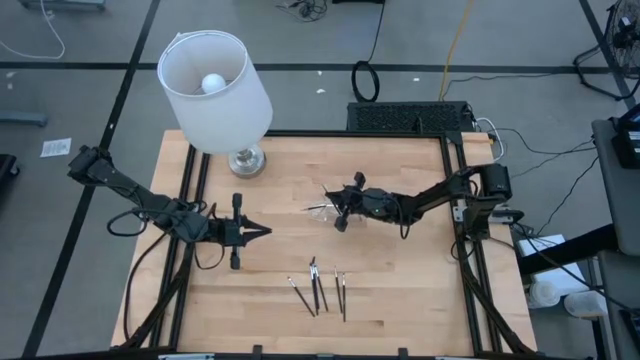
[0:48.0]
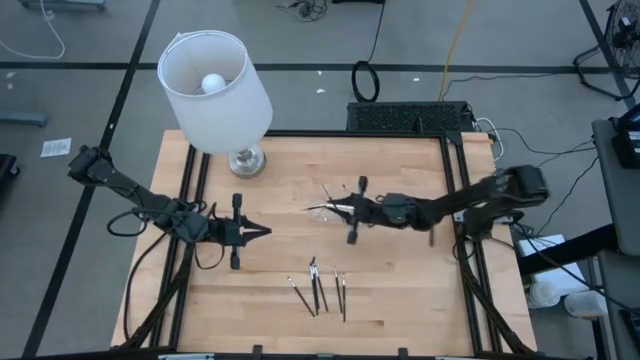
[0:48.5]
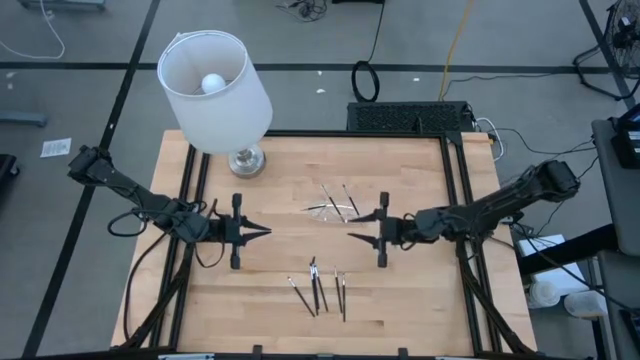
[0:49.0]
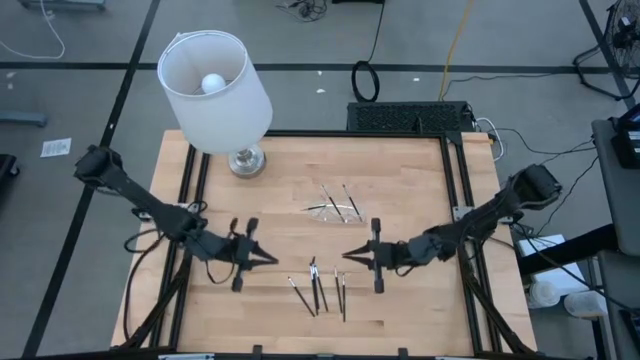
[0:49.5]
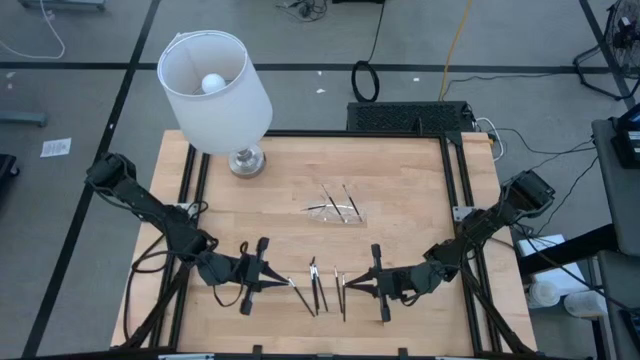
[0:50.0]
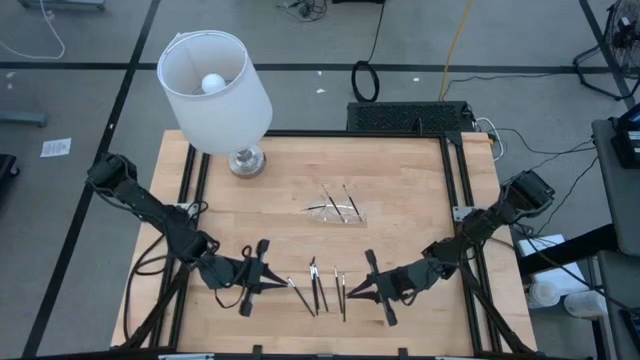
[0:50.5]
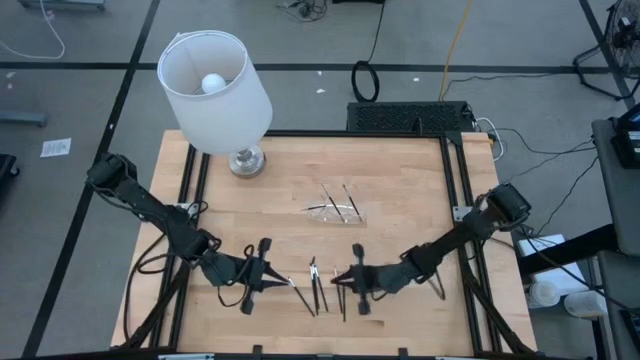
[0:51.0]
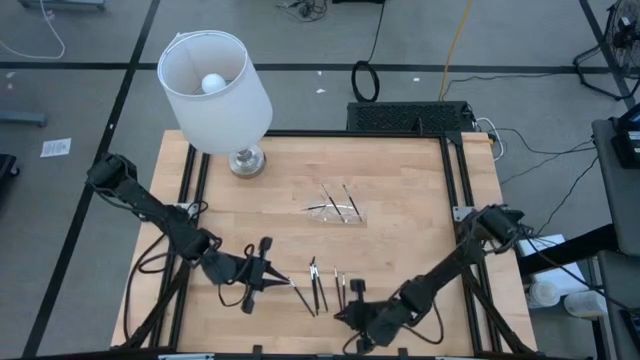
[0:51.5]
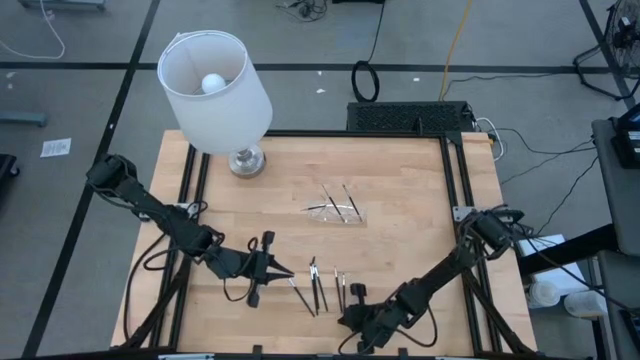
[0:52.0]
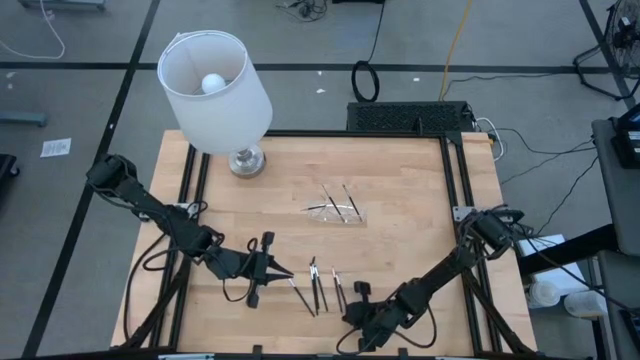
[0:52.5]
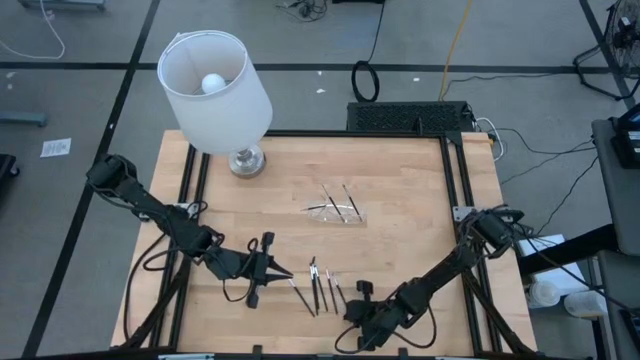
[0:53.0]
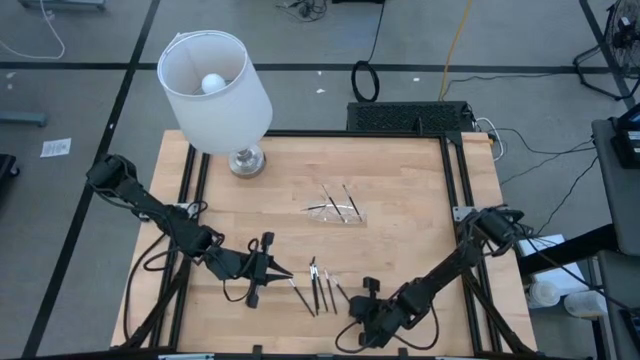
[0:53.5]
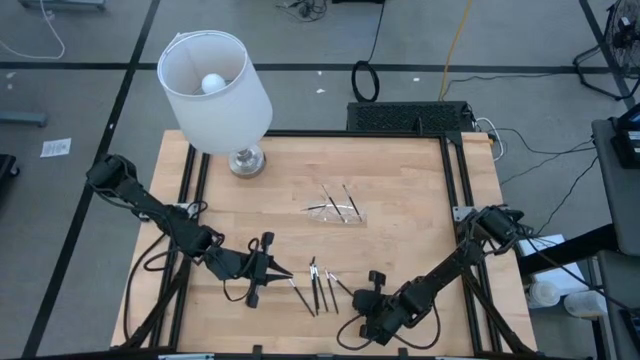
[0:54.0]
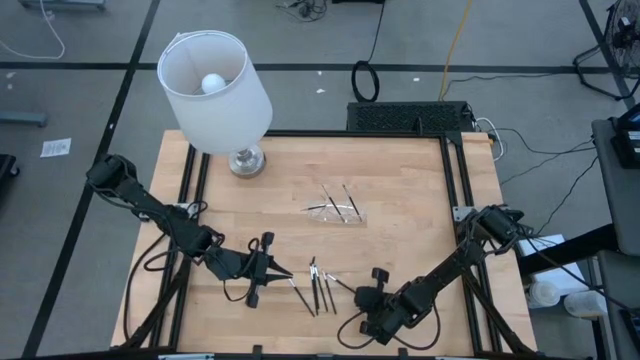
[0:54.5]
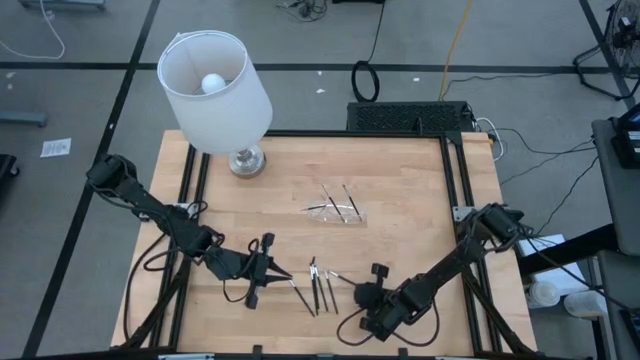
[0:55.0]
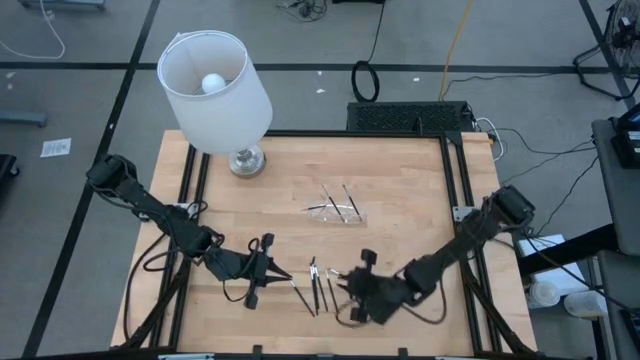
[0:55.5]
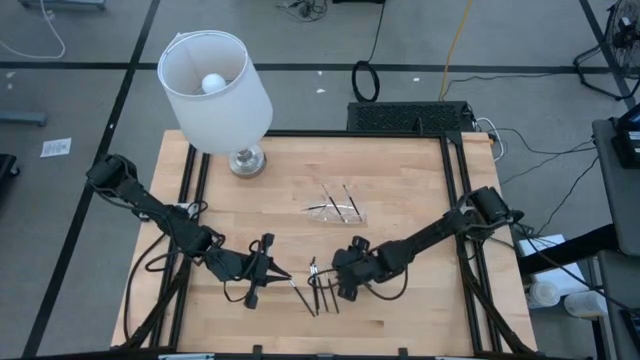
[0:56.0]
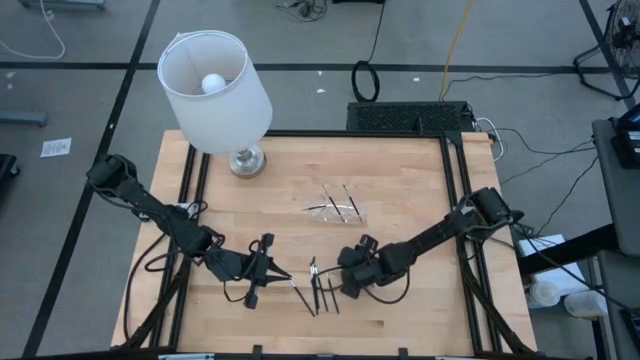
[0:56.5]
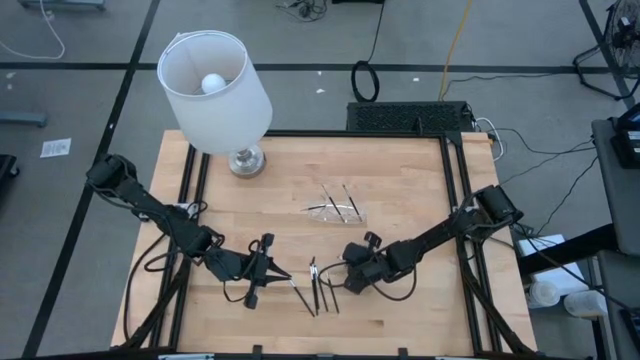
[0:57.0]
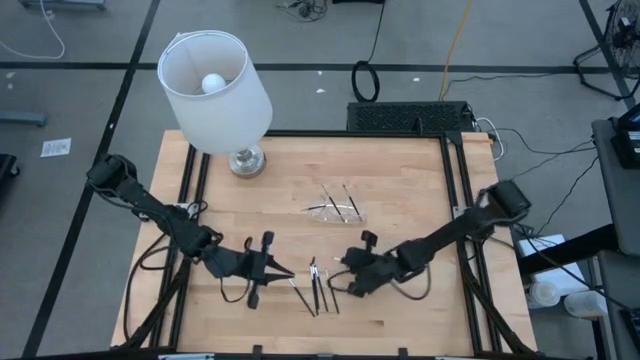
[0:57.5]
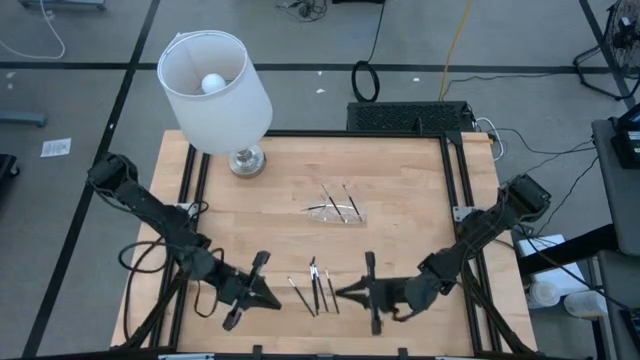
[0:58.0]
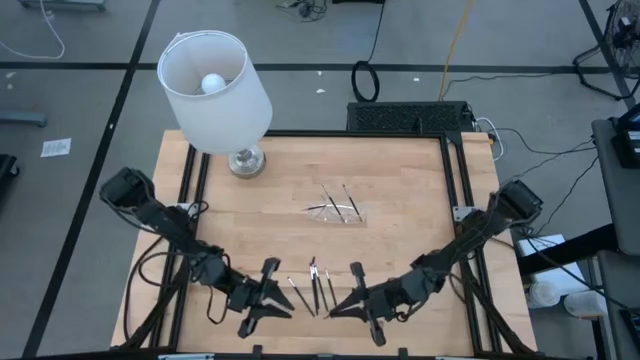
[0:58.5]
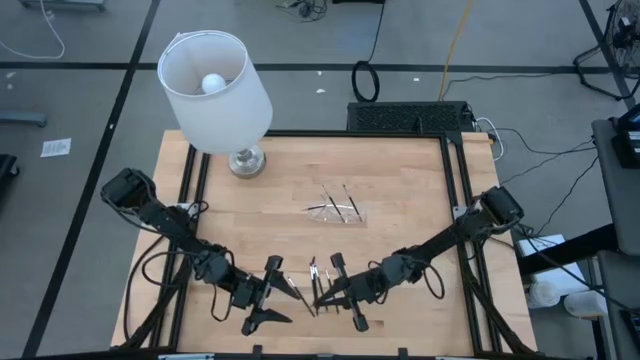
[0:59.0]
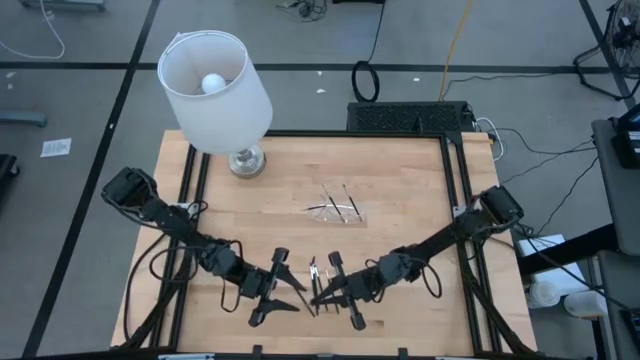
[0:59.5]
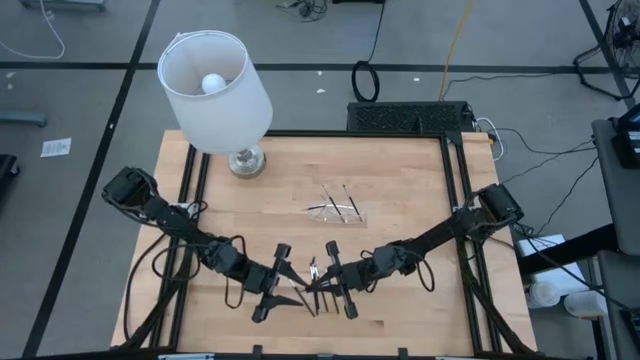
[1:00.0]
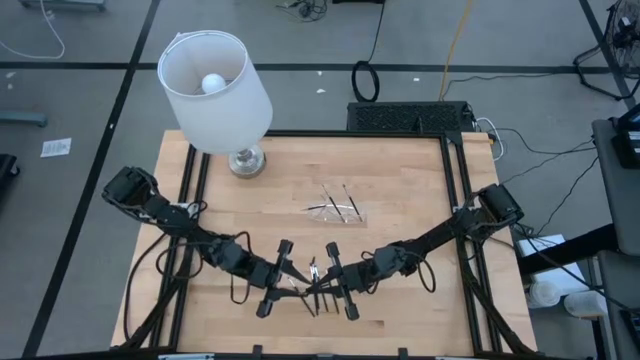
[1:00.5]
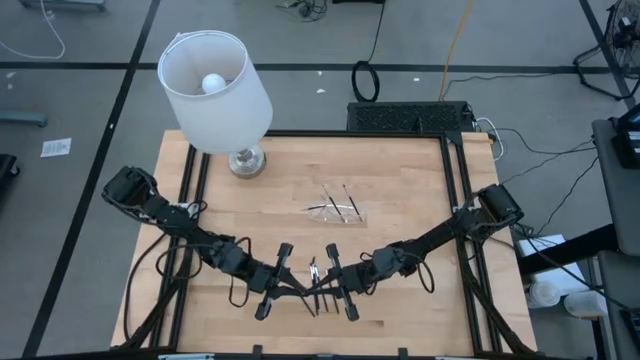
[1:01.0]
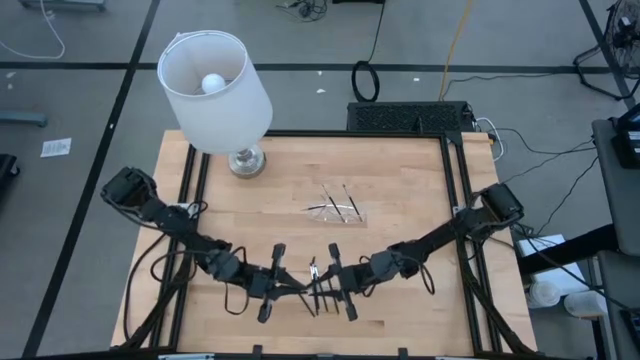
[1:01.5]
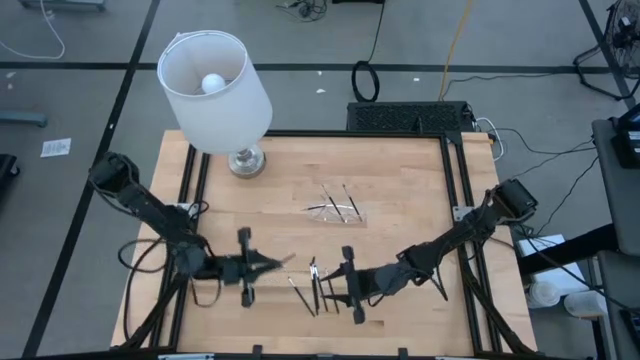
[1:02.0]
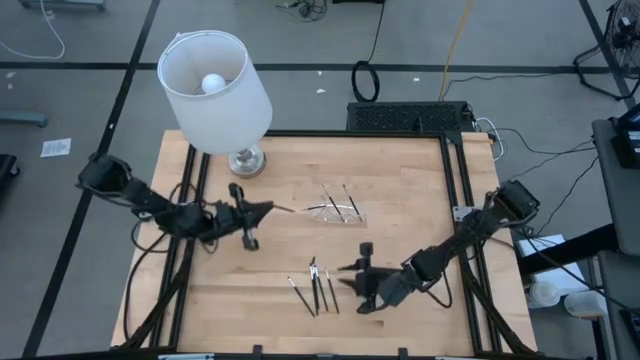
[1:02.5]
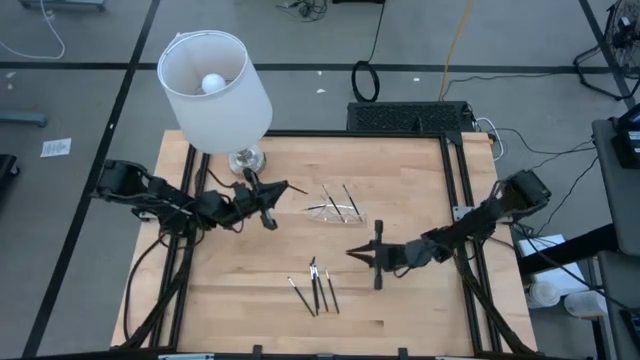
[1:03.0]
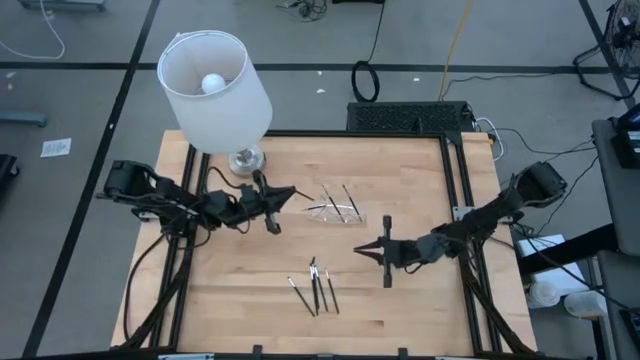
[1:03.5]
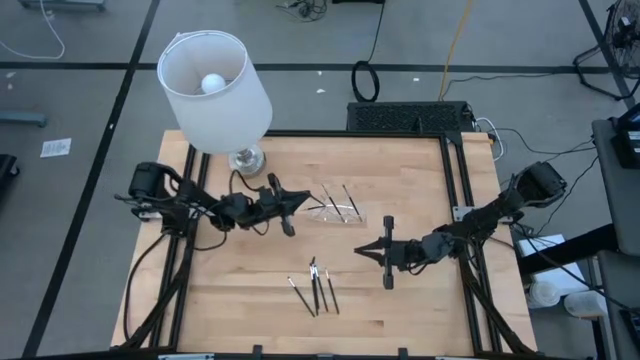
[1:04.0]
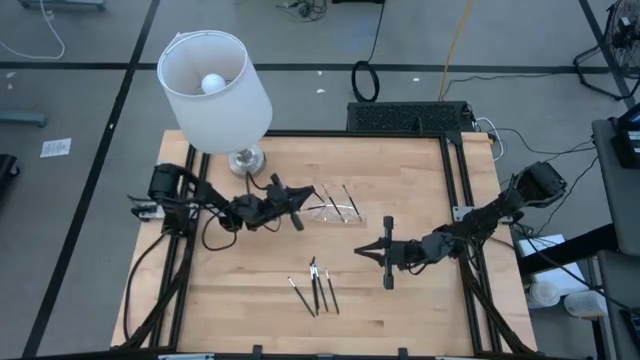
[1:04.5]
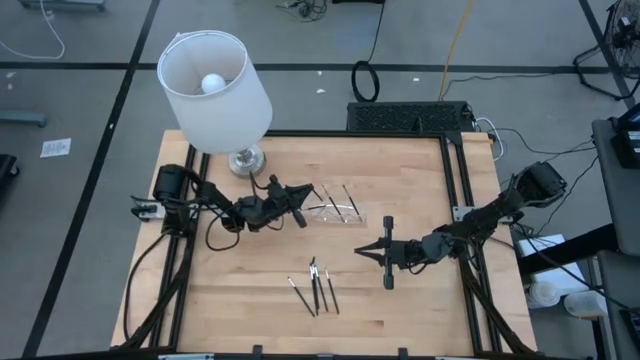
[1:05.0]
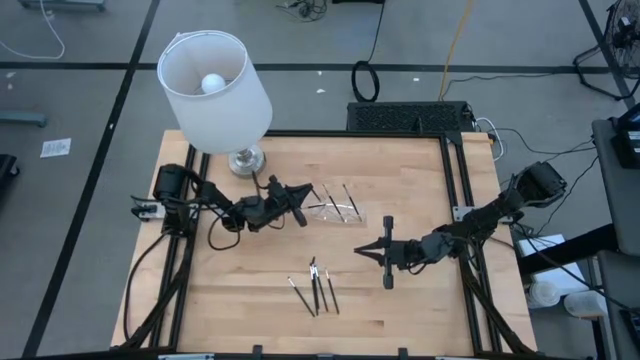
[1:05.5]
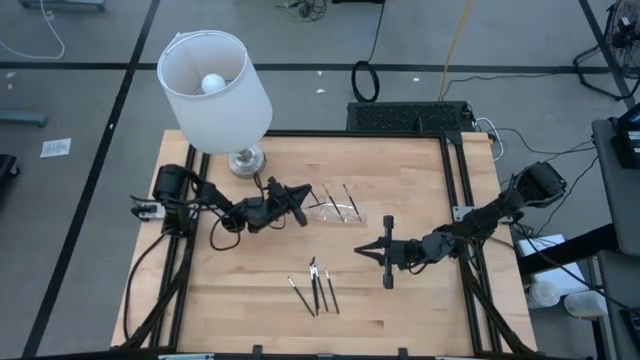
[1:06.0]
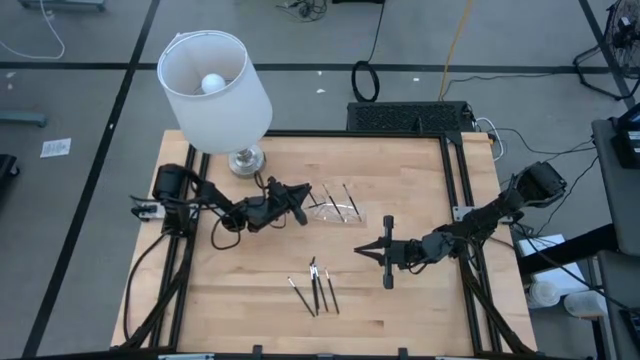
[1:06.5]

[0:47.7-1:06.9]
Task: Put items in baskets/containers
Put the eyeshadow brush into the transparent organizer

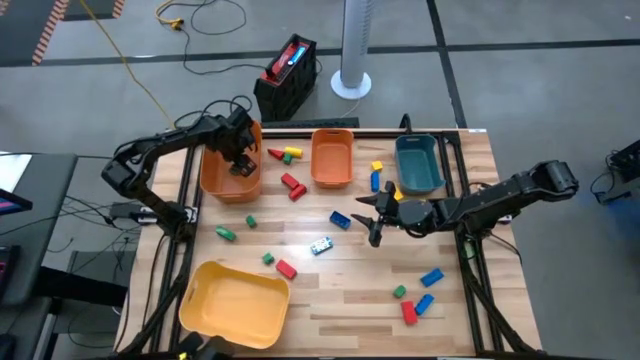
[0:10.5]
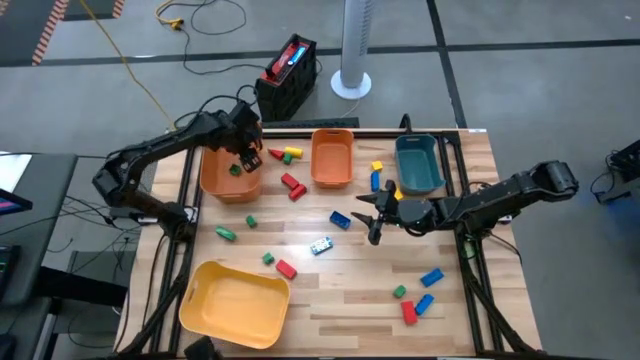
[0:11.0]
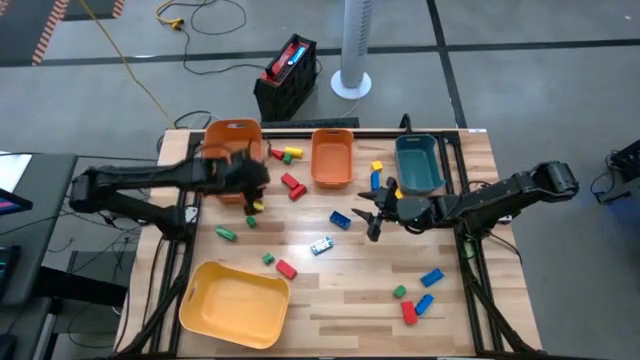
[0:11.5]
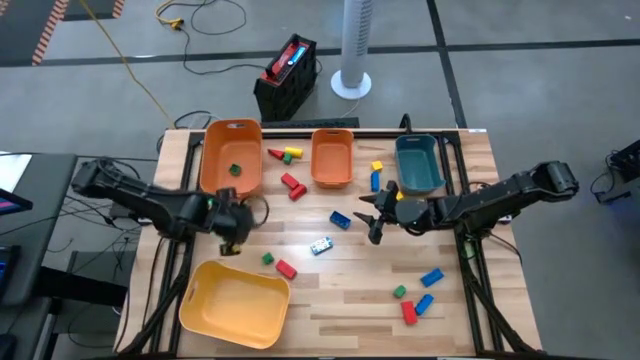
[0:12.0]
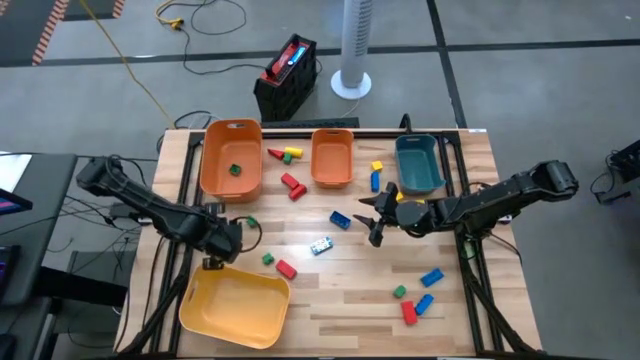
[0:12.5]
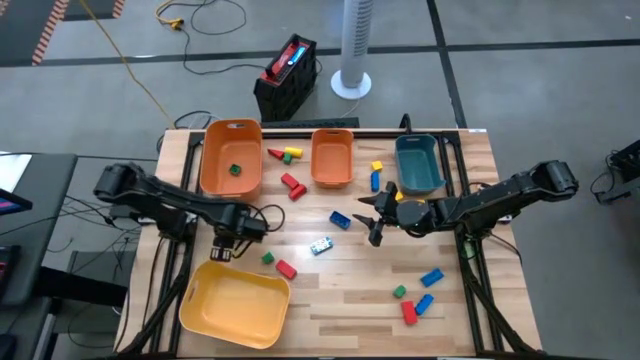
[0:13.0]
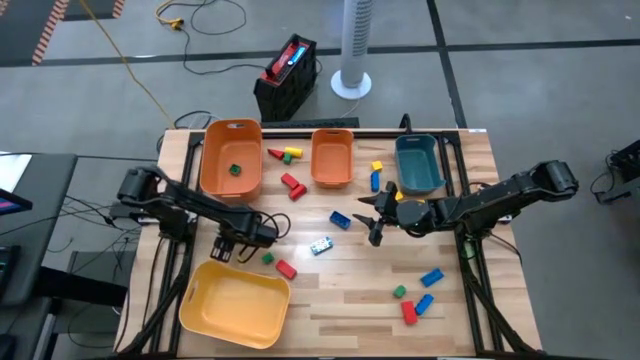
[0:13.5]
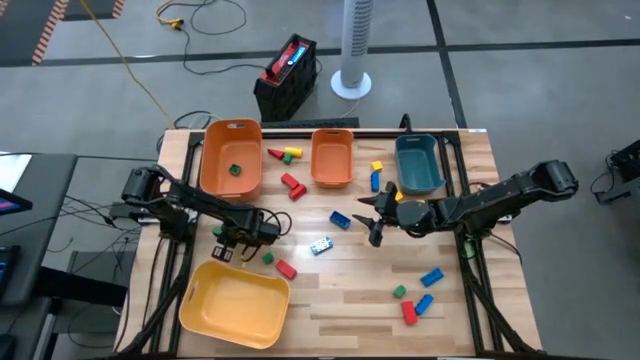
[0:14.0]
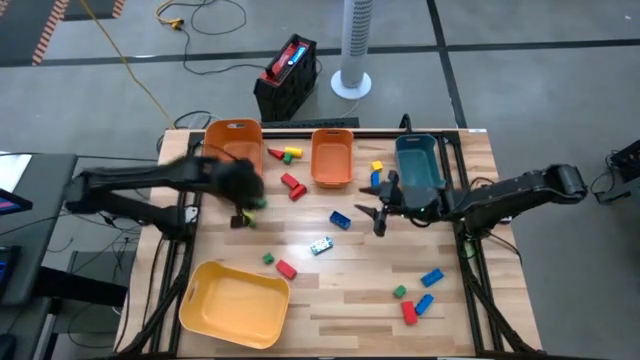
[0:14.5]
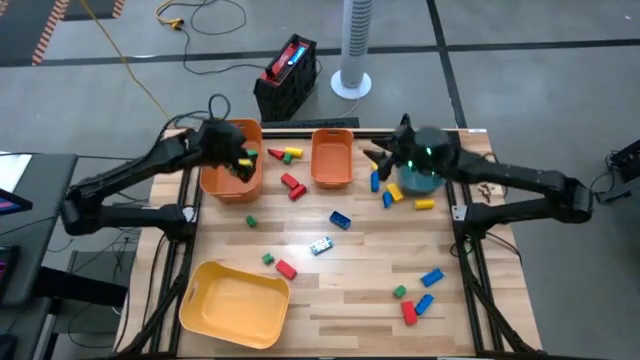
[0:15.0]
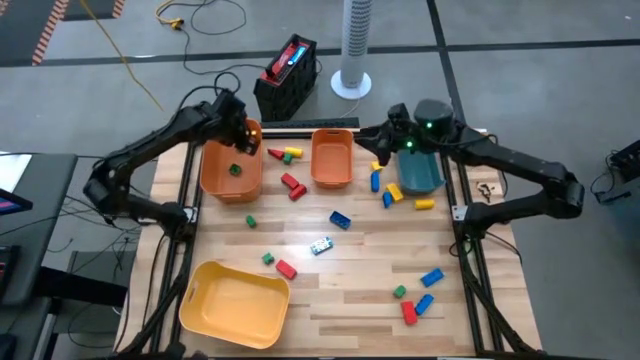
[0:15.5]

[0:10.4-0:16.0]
Task: Sort blocks
Put the green game piece into the left orange bin
